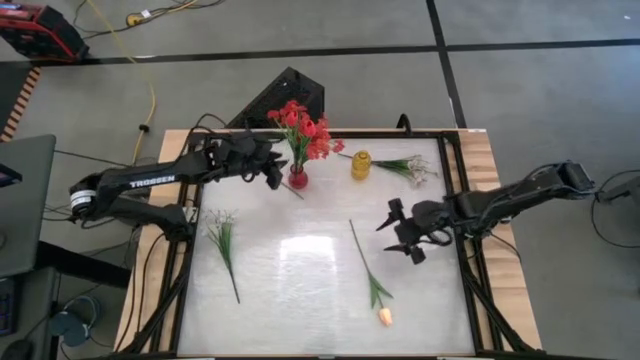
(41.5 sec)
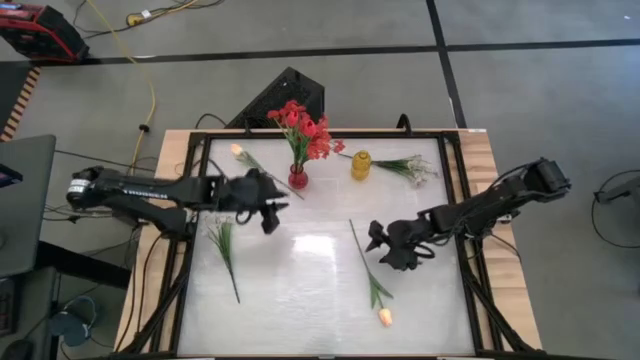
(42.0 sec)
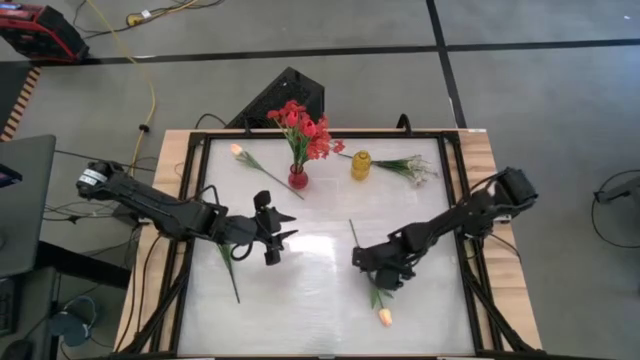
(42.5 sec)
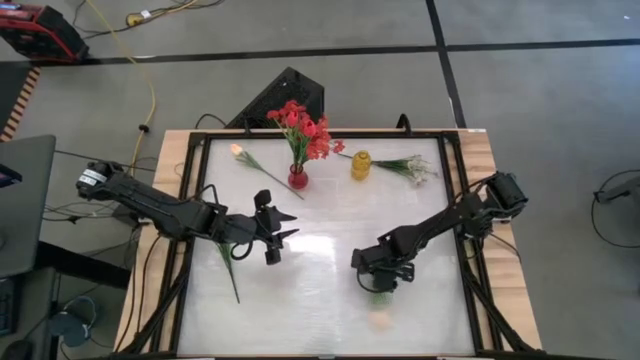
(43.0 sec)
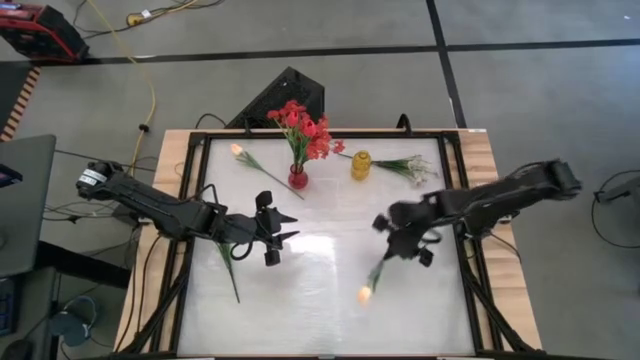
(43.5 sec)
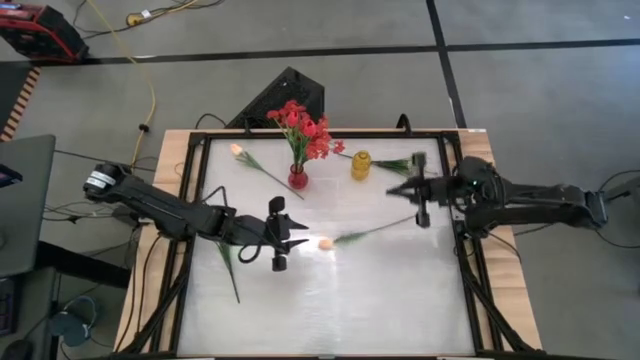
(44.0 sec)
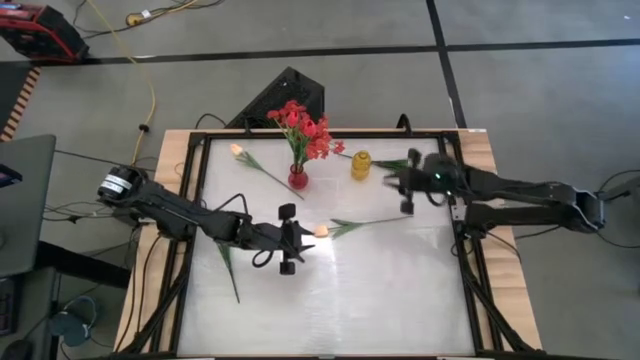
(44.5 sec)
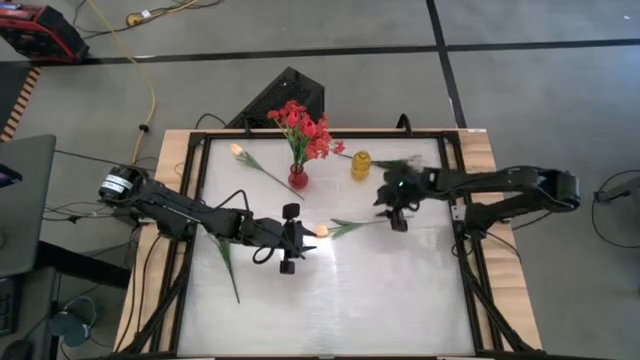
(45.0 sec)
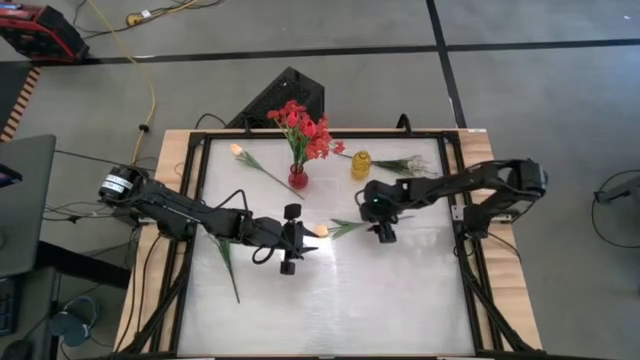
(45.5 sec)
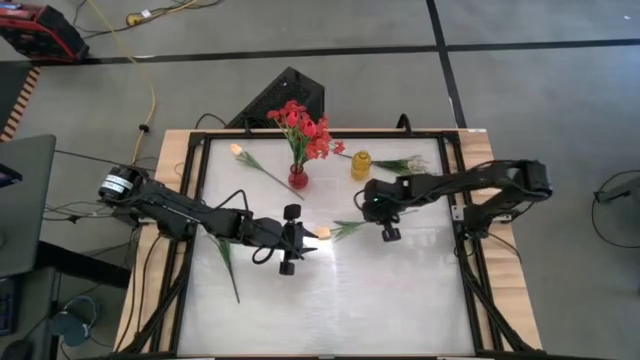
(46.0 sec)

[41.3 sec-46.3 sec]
Task: Sort flowers into vase by color
Put the bottom white tulip into the yellow vase

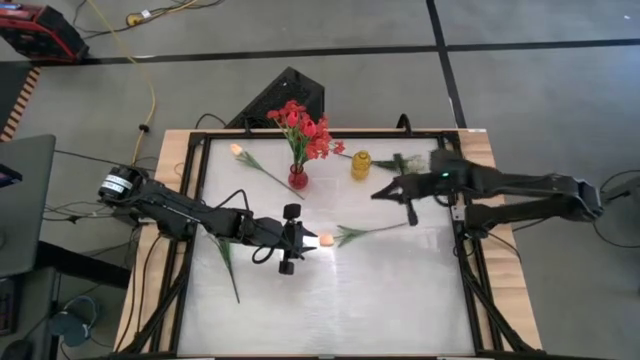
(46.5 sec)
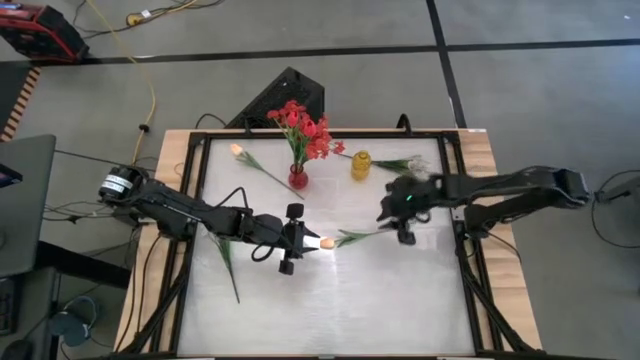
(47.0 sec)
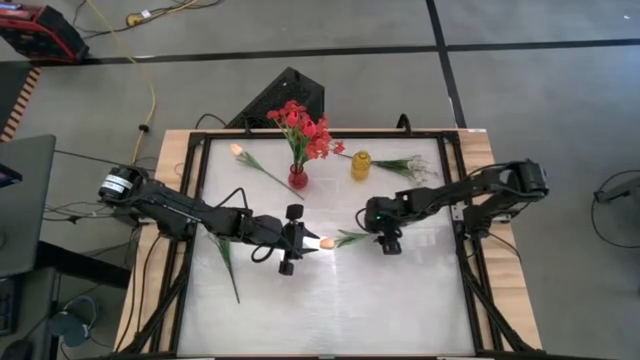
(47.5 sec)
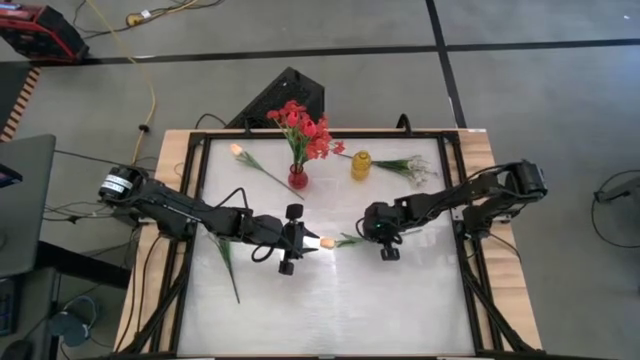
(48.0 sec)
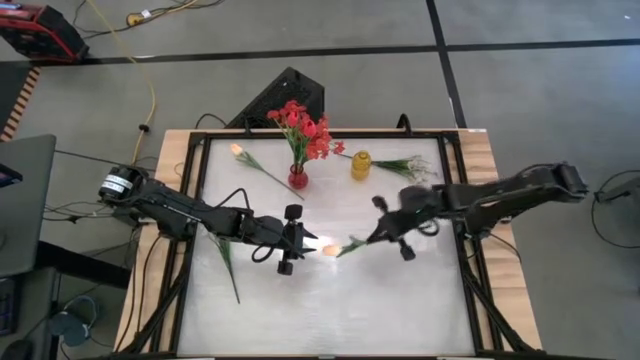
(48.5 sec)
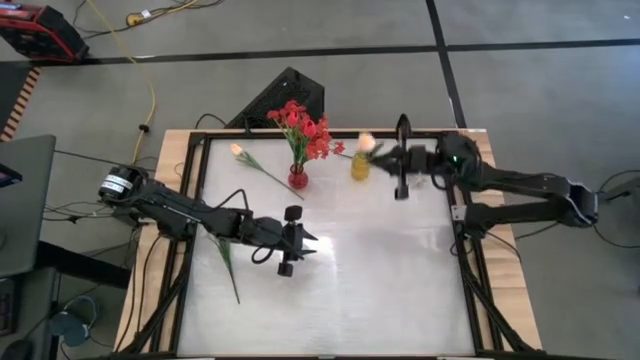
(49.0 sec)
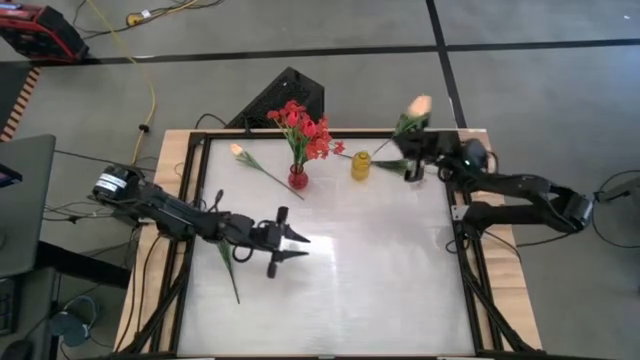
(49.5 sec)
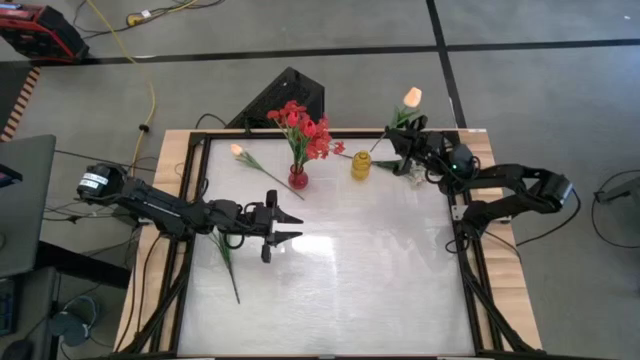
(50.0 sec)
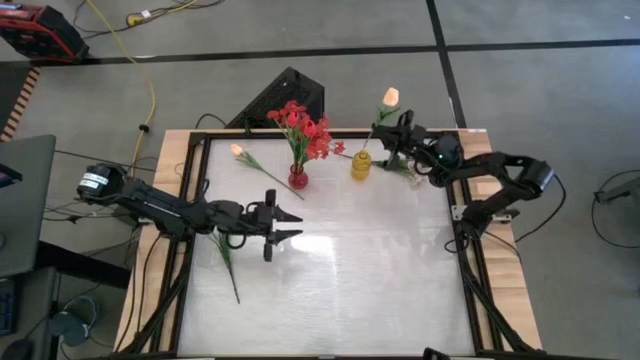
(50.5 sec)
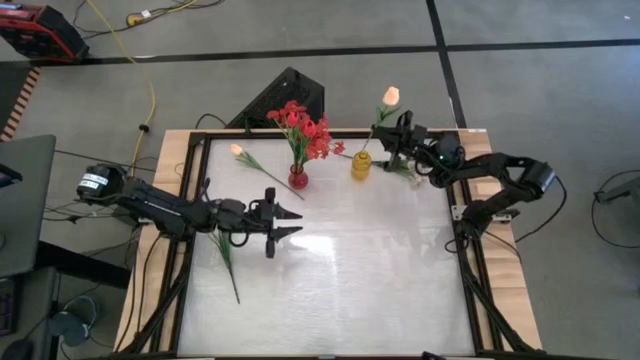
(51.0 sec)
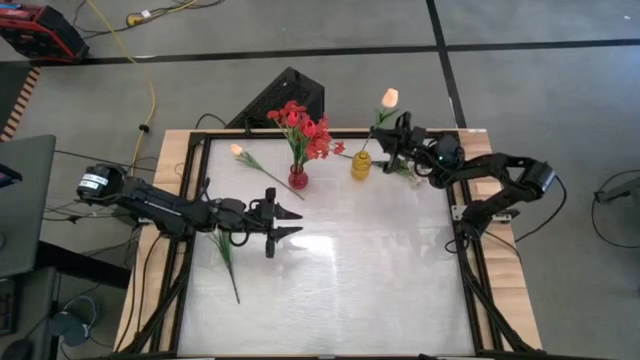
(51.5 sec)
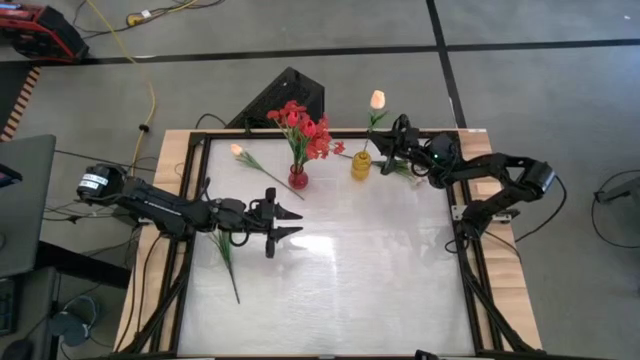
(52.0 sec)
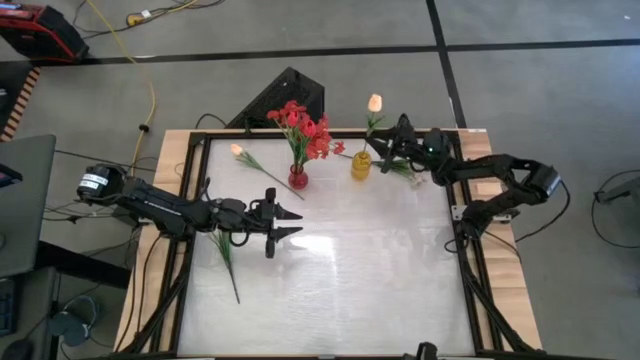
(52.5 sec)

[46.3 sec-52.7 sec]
Put the bottom white tulip into the yellow vase

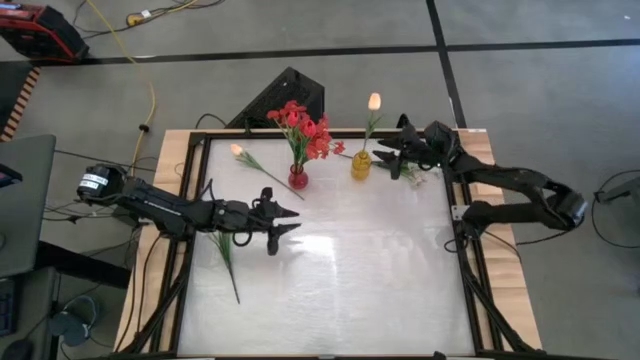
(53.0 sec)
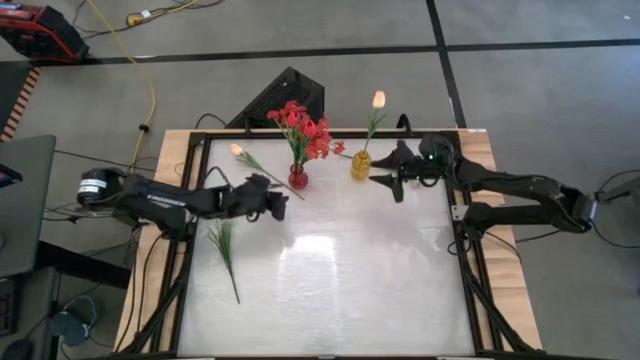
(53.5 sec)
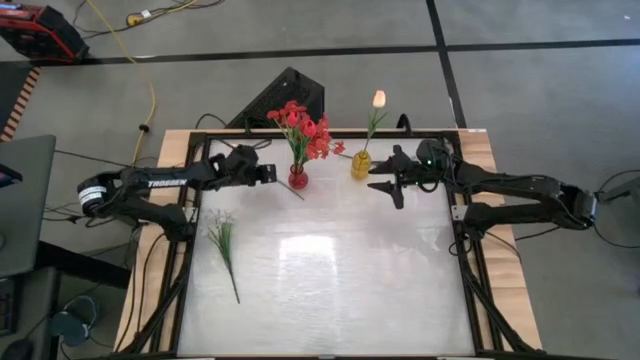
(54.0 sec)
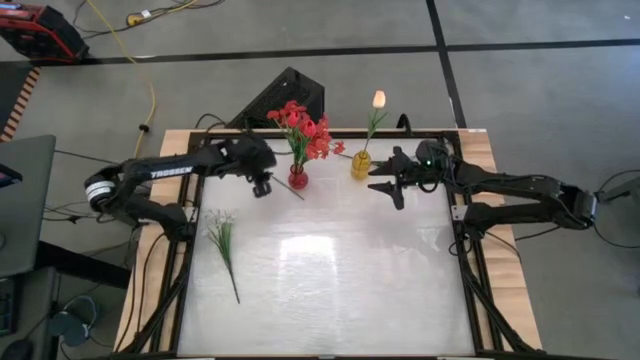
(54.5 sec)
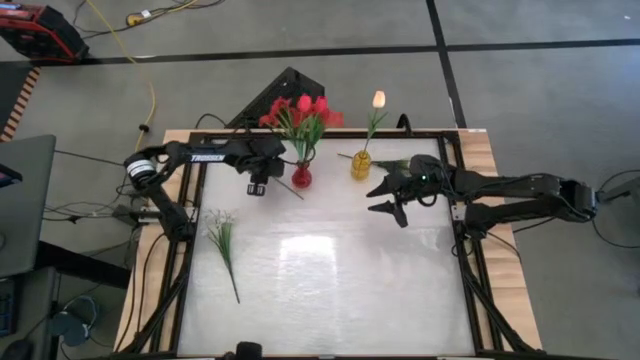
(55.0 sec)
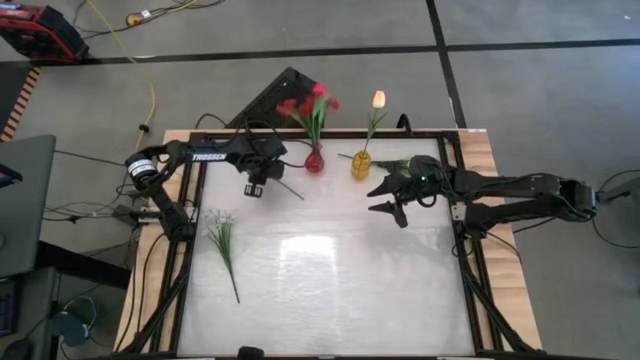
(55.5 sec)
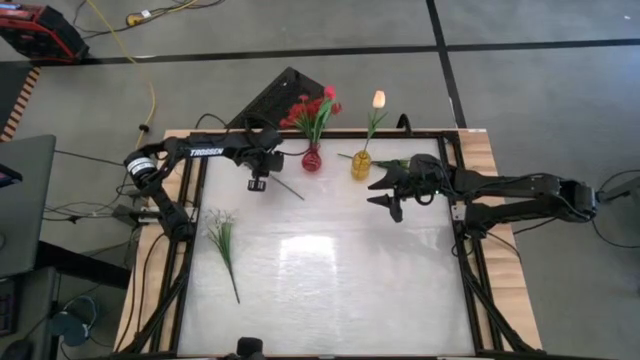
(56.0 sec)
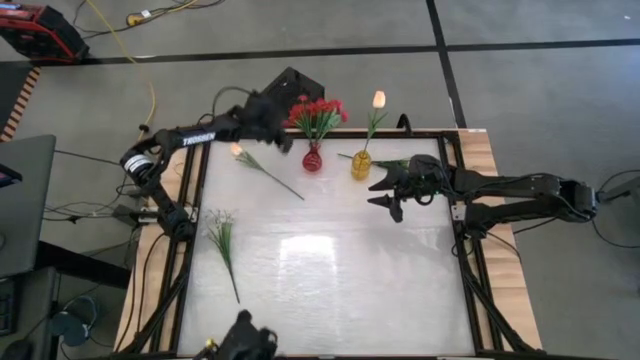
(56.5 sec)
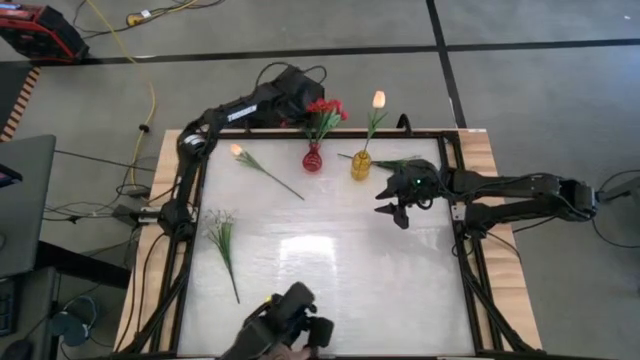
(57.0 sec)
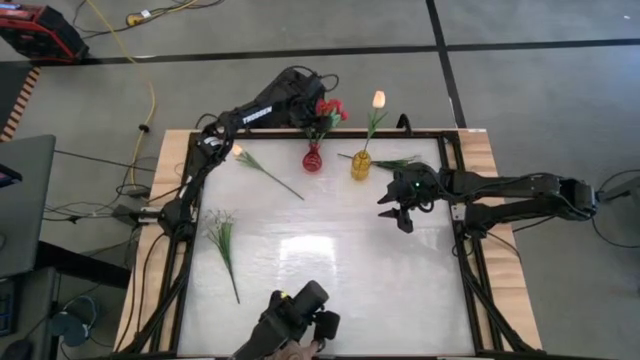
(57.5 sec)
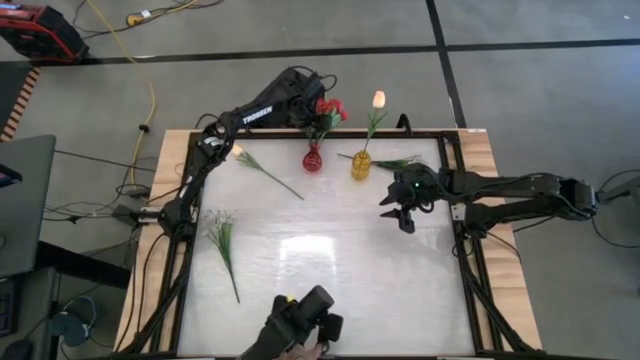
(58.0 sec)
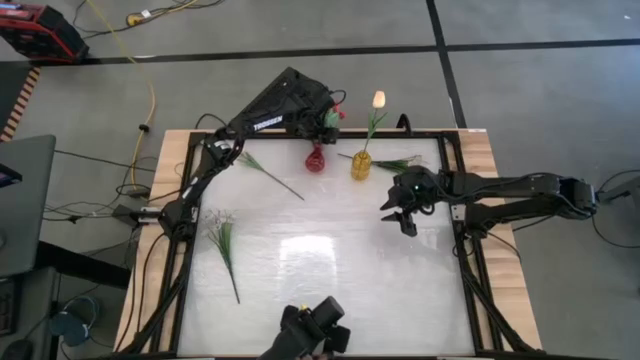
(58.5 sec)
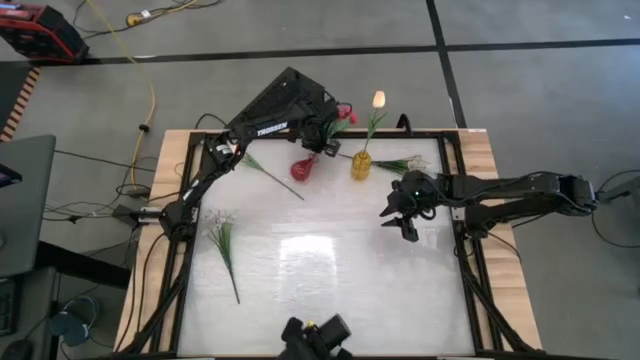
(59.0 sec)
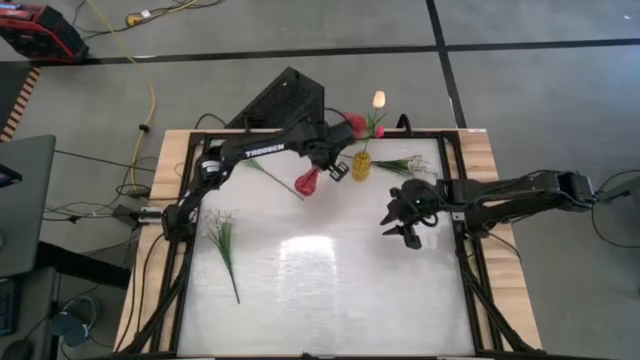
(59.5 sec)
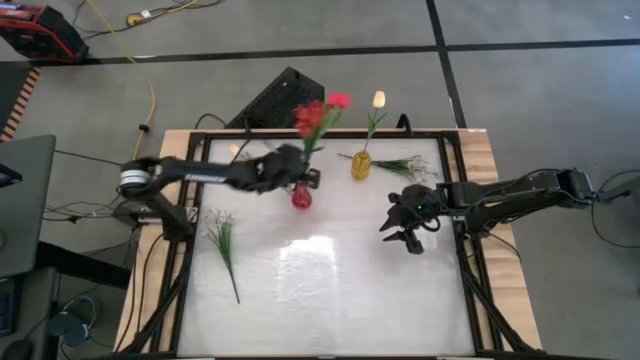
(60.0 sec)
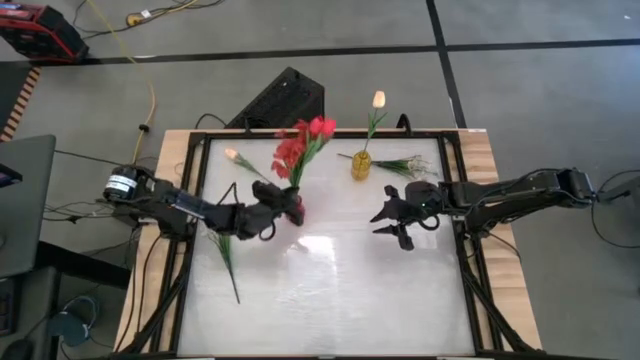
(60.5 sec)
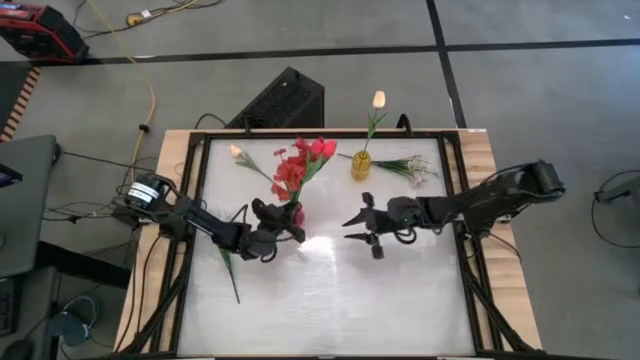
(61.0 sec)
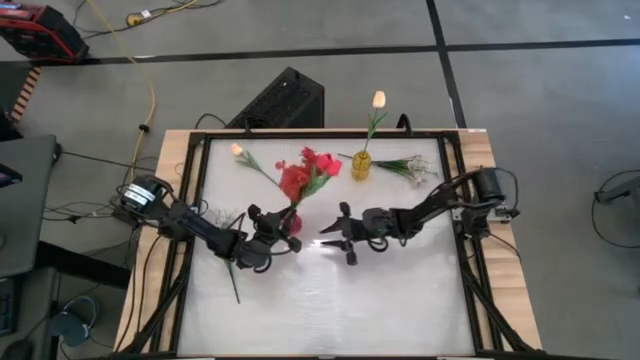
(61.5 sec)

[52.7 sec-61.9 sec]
Adjust the red vase
